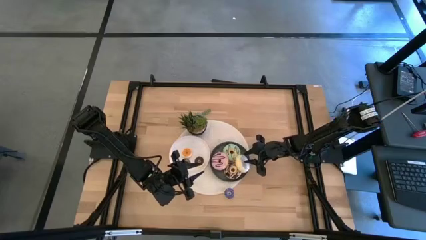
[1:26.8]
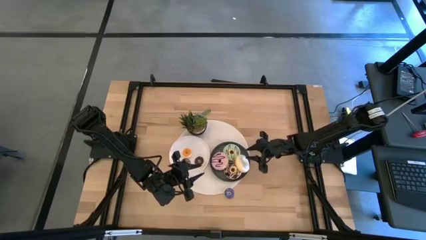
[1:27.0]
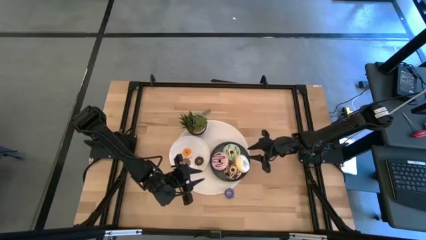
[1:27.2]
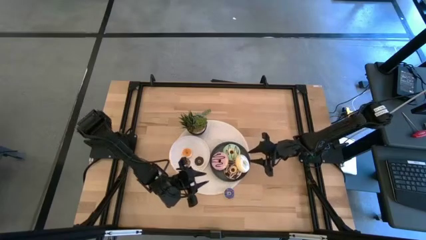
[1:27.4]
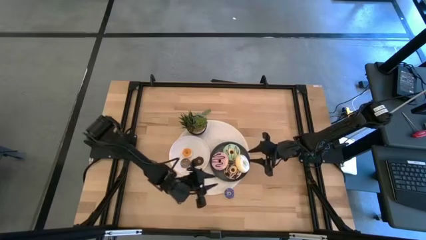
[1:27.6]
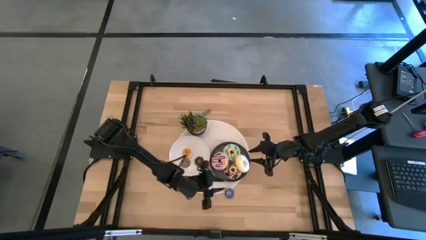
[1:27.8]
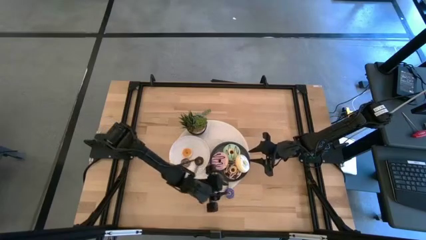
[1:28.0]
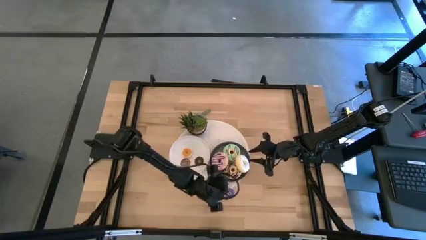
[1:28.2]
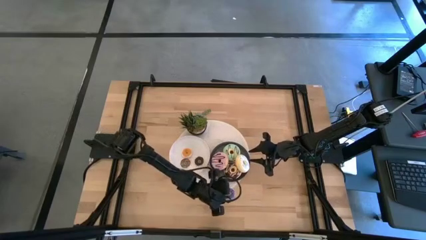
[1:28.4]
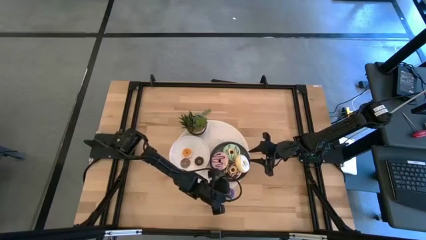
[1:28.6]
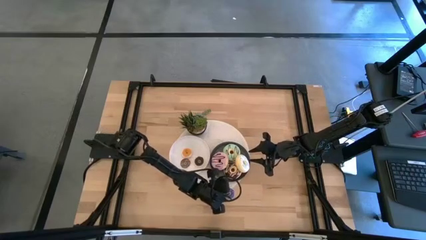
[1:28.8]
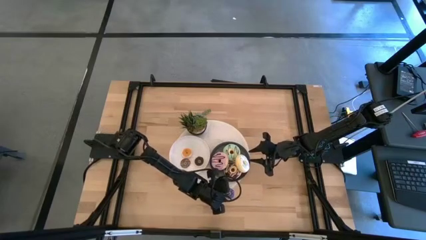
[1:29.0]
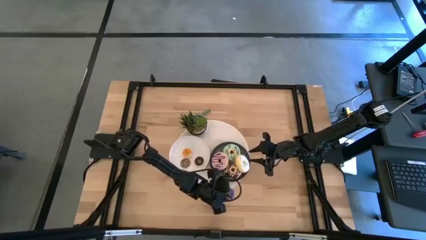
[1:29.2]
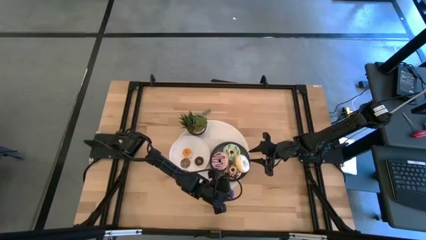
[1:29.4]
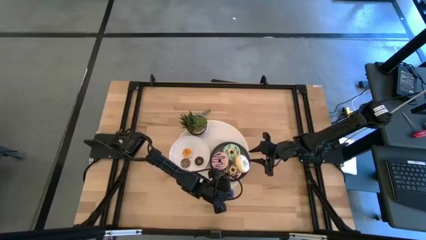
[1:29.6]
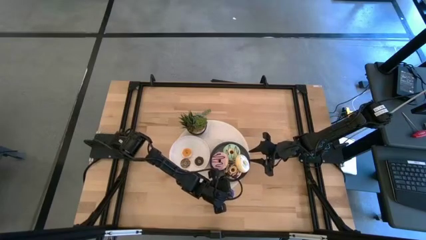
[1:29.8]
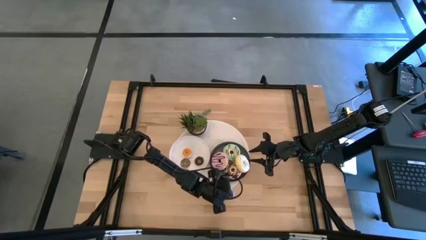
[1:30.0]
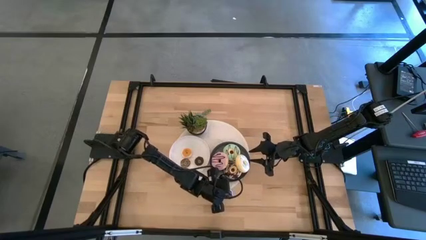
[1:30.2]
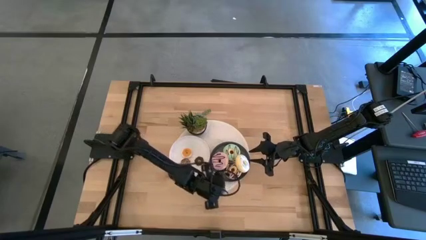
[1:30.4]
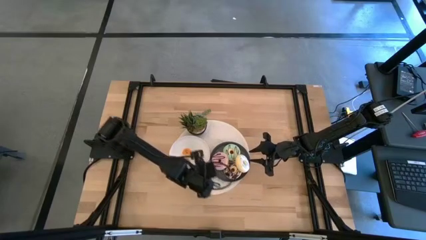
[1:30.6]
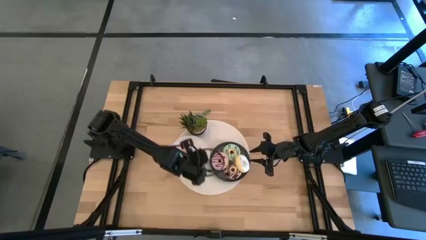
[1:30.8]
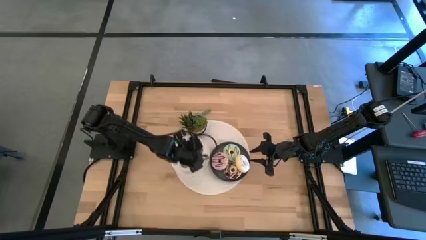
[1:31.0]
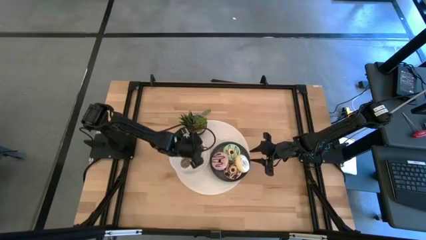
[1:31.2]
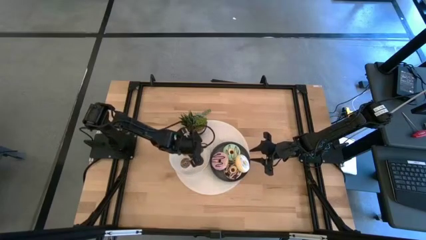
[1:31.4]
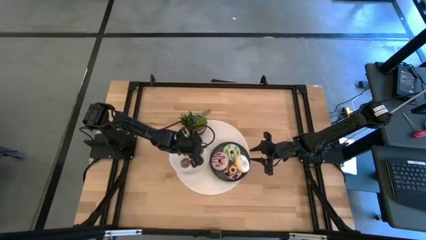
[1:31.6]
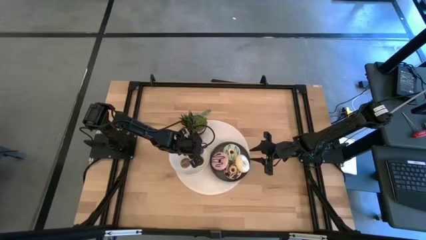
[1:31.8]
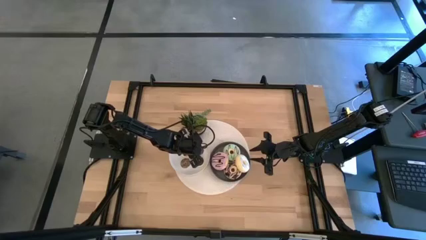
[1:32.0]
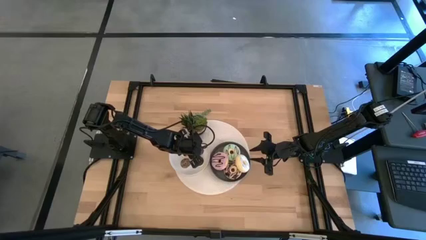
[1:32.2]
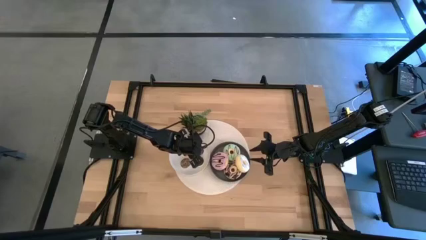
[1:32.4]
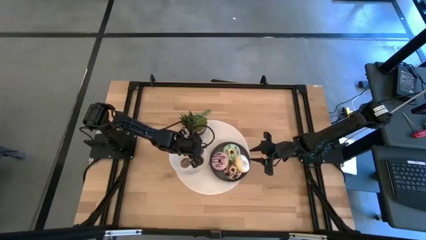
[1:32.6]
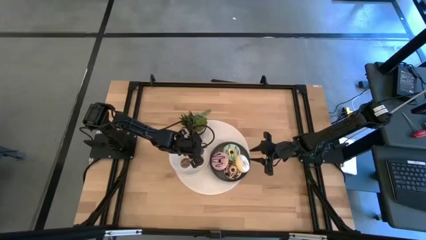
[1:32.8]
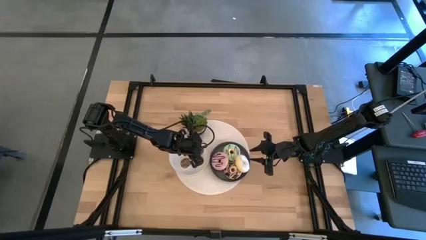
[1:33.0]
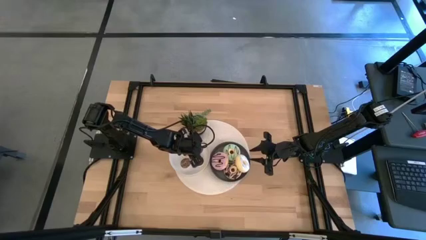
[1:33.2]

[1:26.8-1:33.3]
Task: Pick & Place donuts
Put the small violet donut on the white plate

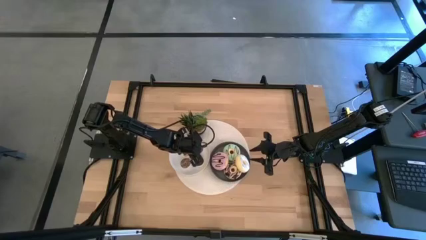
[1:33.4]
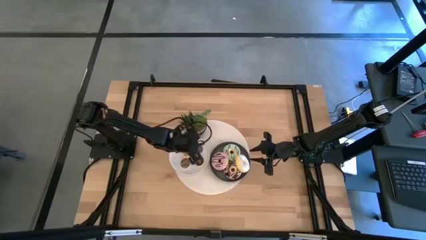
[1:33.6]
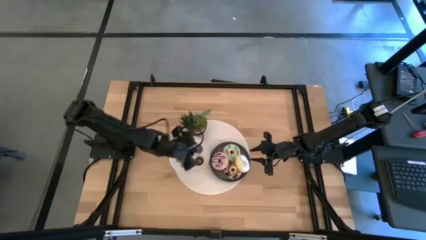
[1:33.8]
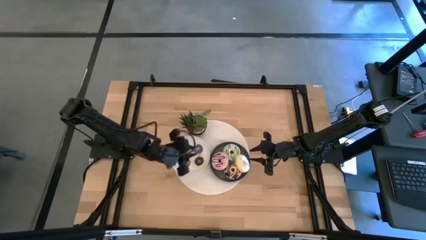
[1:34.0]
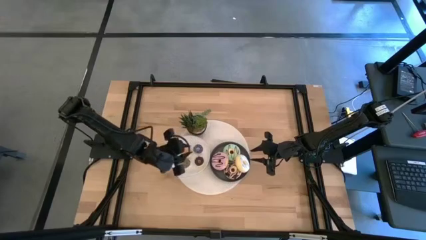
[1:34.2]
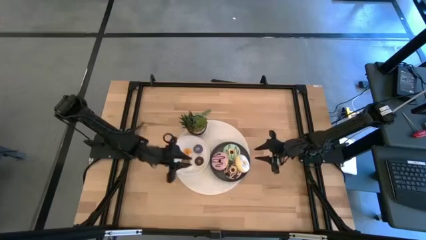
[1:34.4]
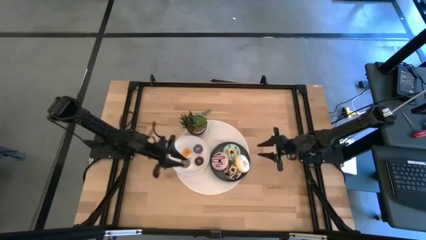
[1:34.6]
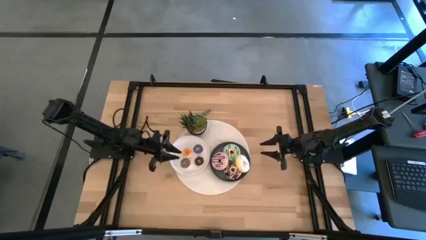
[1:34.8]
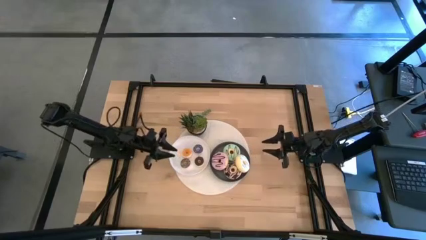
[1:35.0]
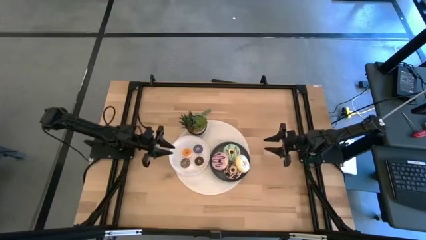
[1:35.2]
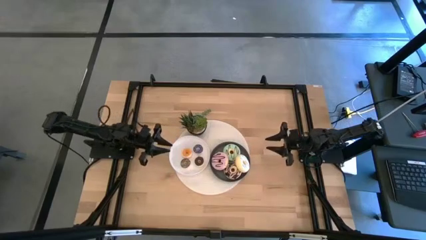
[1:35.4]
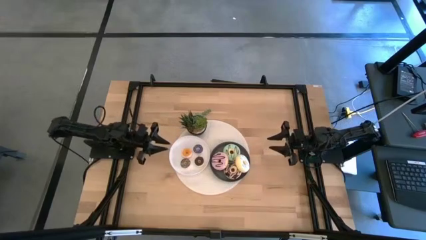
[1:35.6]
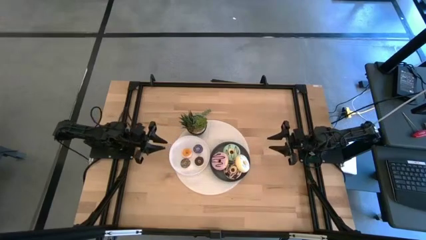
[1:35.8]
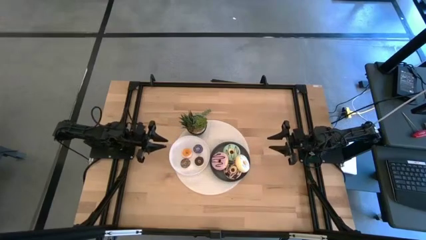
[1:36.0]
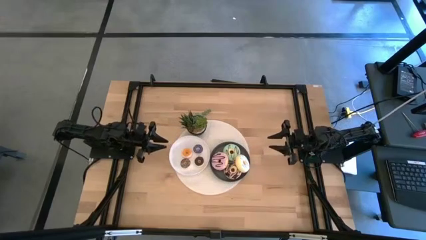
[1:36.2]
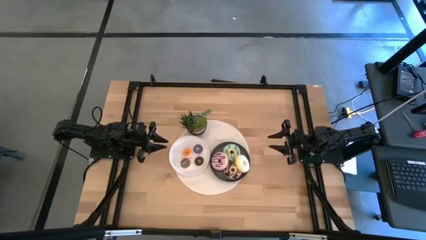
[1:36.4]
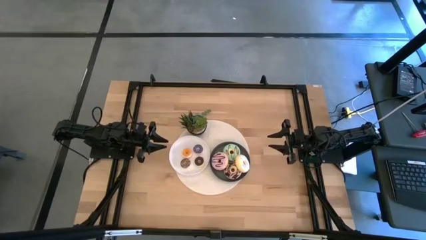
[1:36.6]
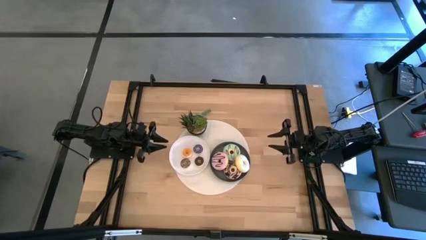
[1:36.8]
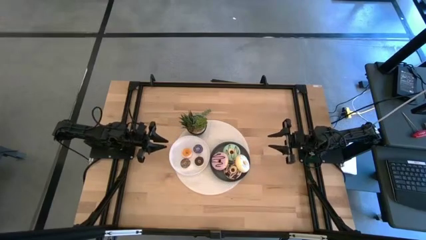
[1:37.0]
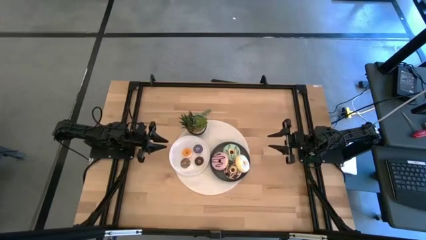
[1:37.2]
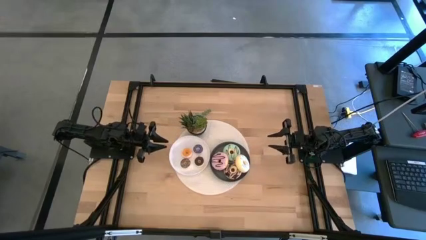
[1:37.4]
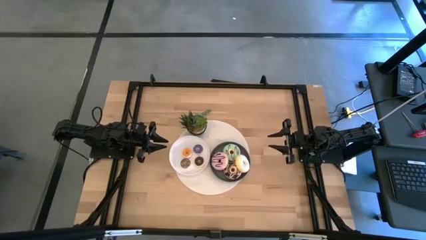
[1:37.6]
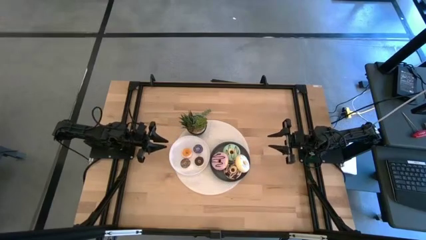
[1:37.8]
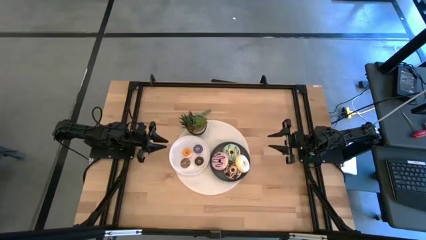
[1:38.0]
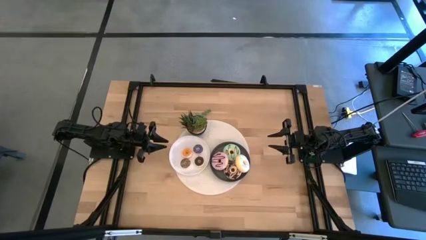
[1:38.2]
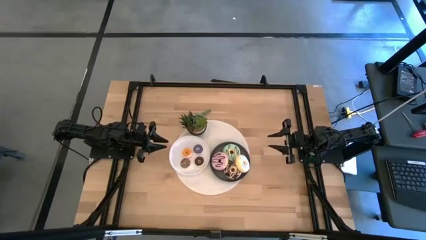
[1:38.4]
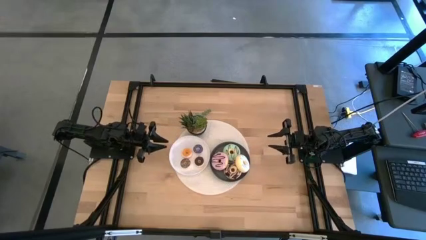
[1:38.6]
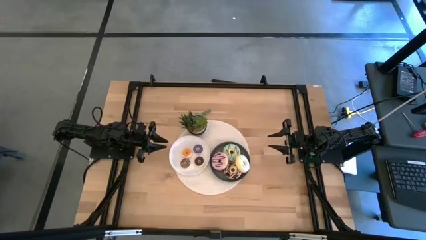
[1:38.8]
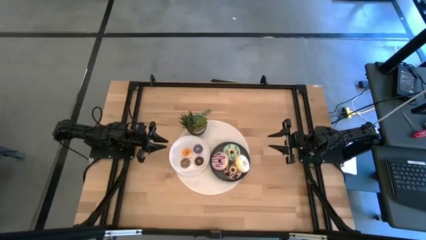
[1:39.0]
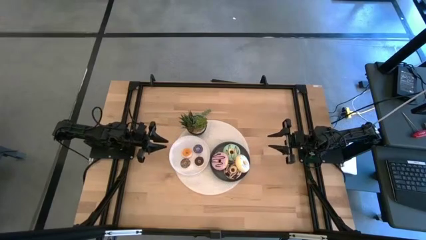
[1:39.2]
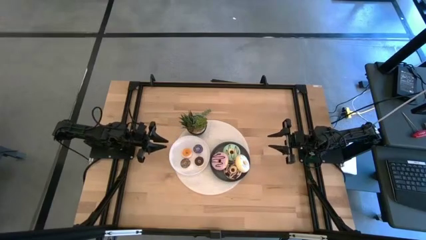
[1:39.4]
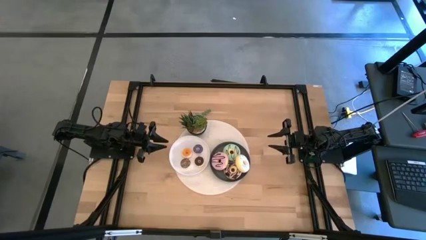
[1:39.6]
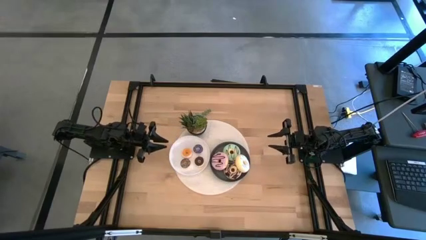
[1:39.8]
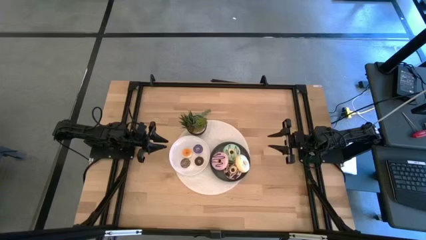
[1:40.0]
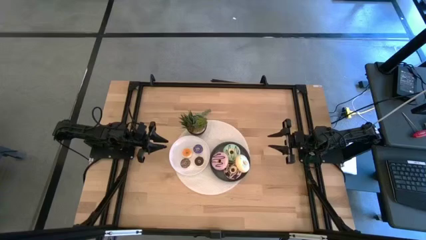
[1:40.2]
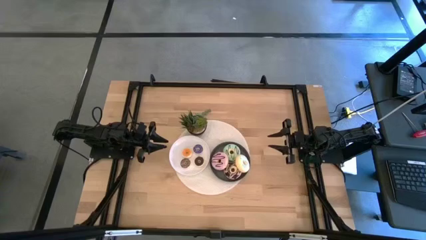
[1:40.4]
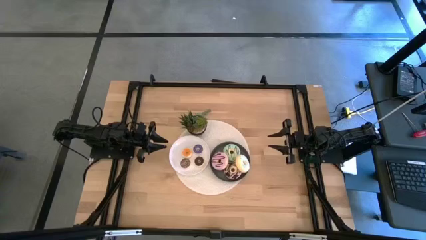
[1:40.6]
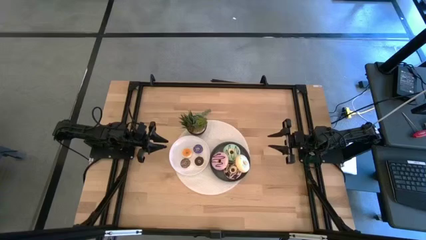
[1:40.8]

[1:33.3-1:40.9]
Return to Home Position
